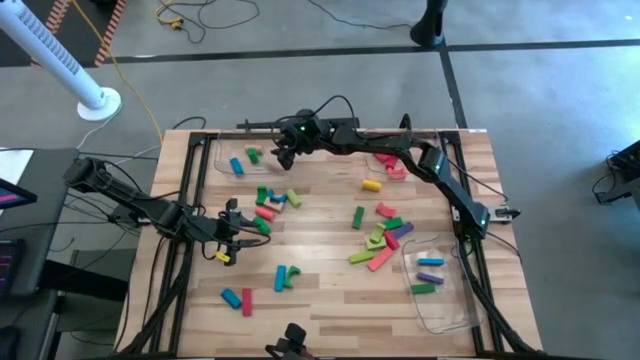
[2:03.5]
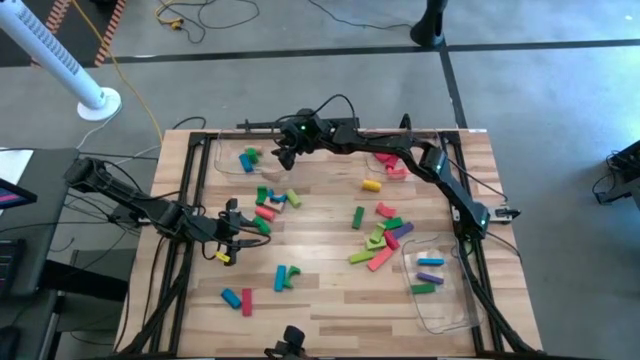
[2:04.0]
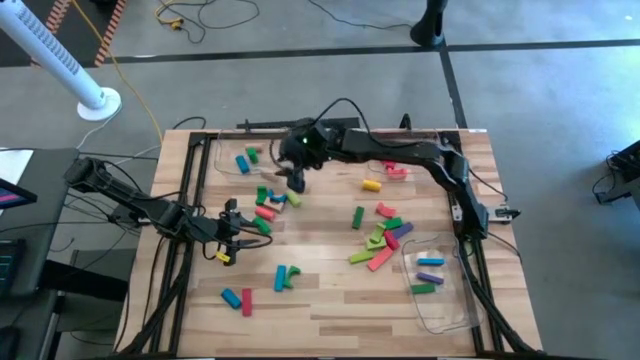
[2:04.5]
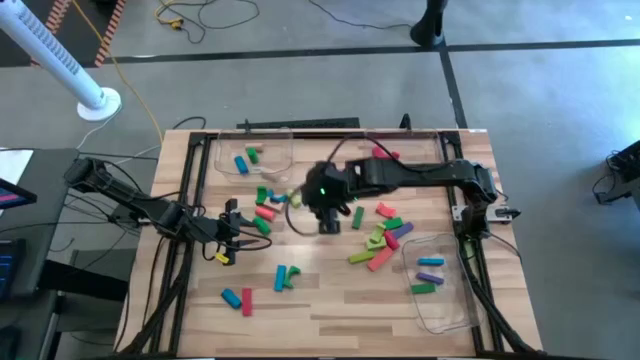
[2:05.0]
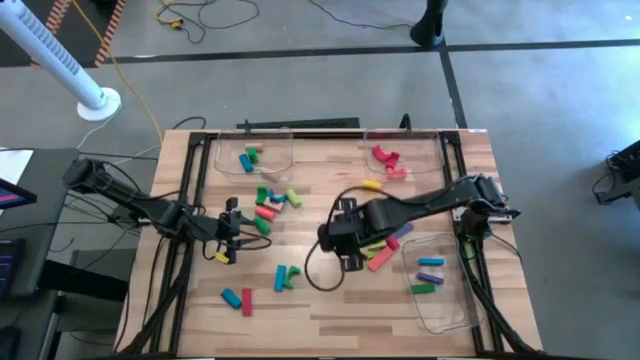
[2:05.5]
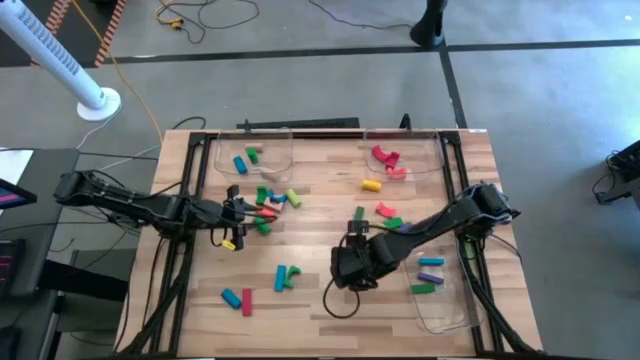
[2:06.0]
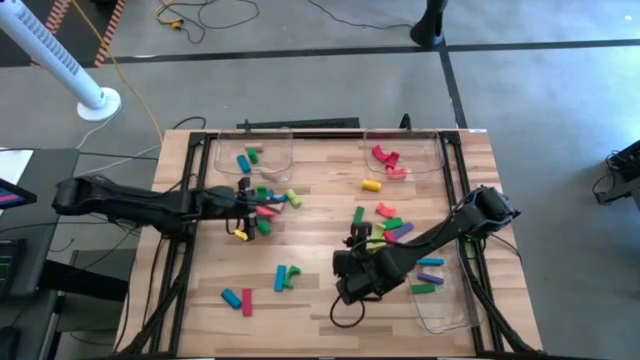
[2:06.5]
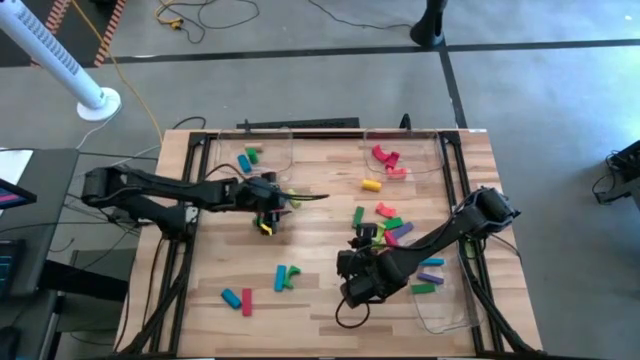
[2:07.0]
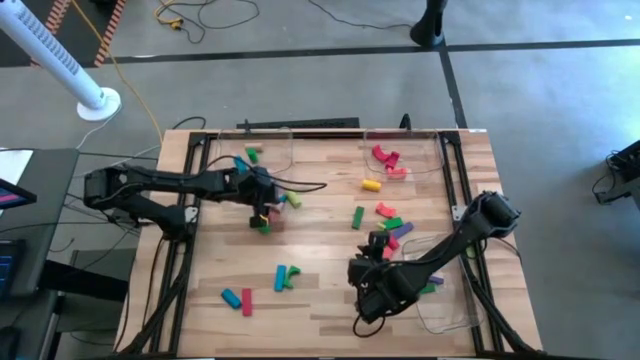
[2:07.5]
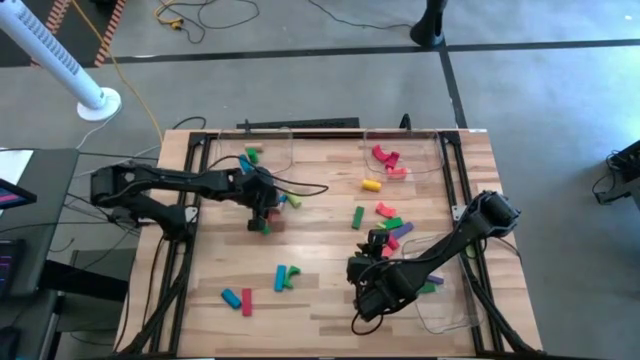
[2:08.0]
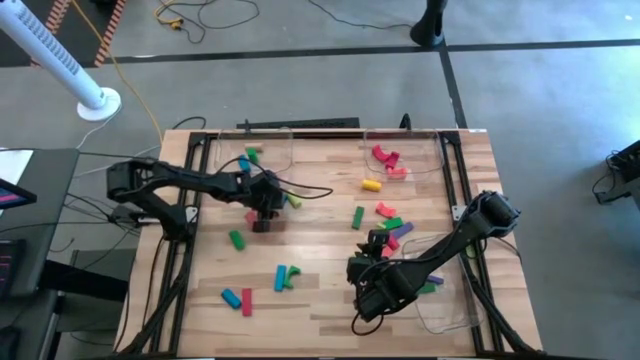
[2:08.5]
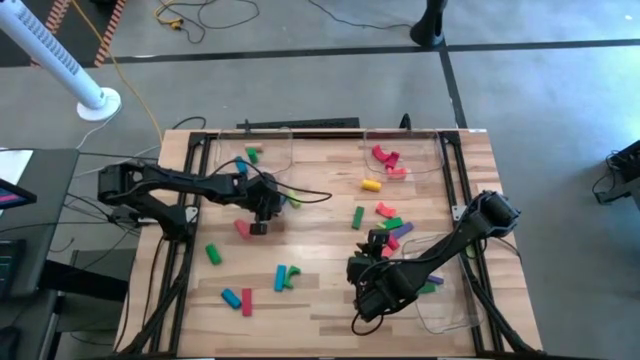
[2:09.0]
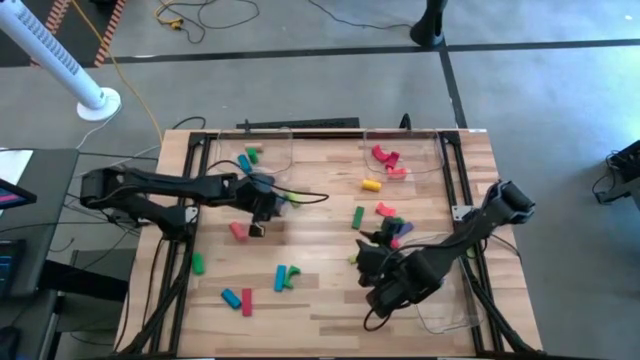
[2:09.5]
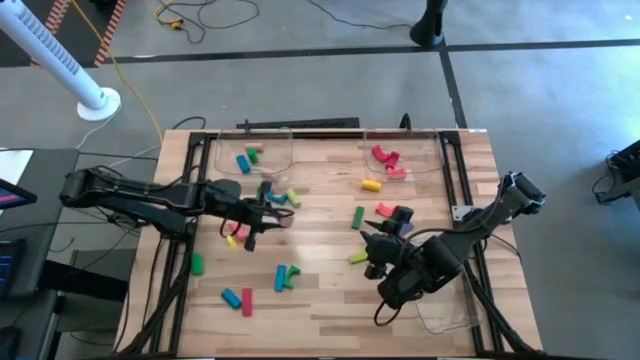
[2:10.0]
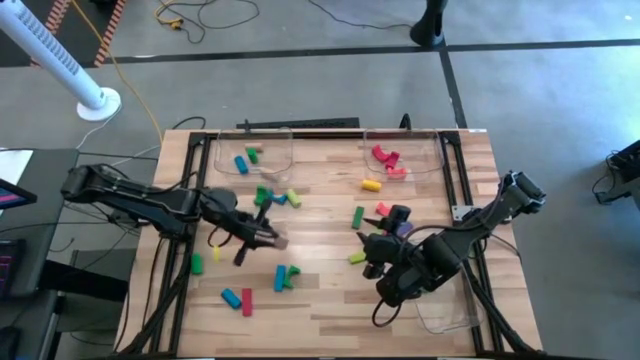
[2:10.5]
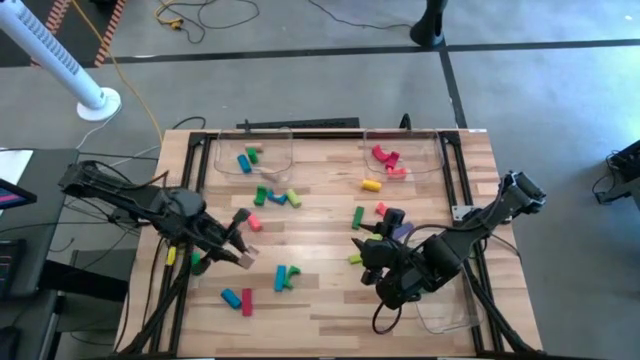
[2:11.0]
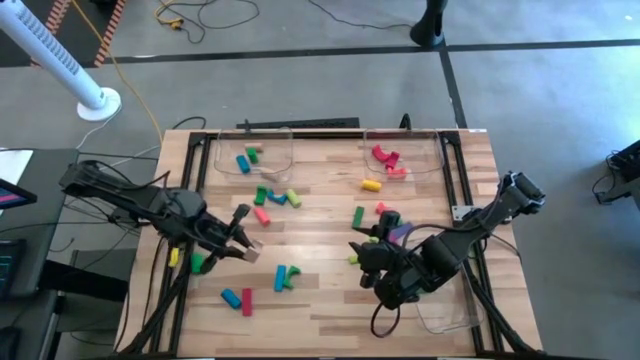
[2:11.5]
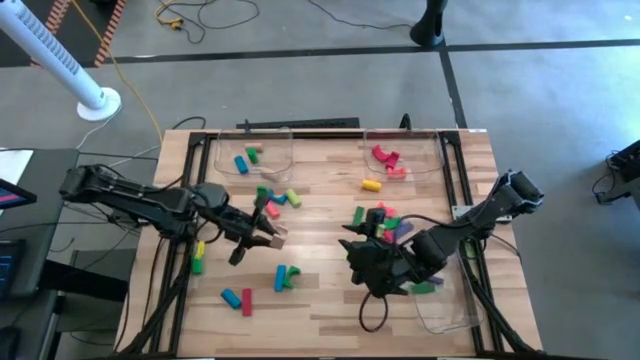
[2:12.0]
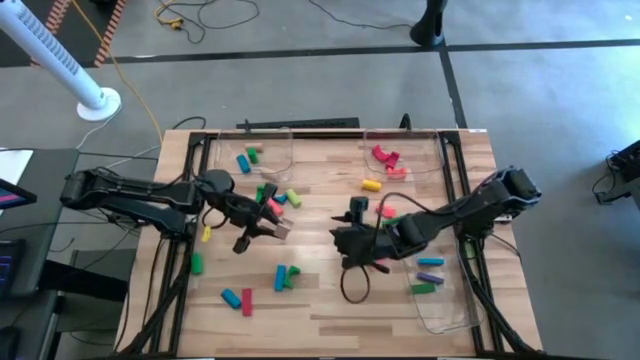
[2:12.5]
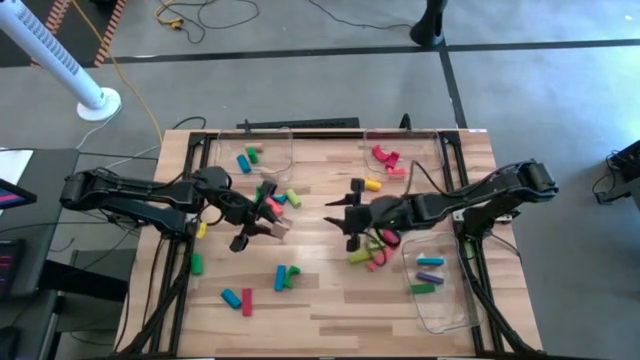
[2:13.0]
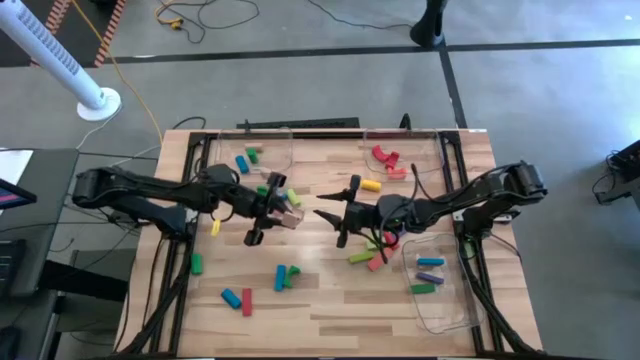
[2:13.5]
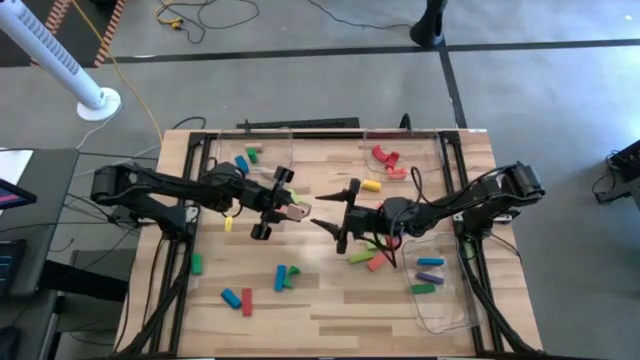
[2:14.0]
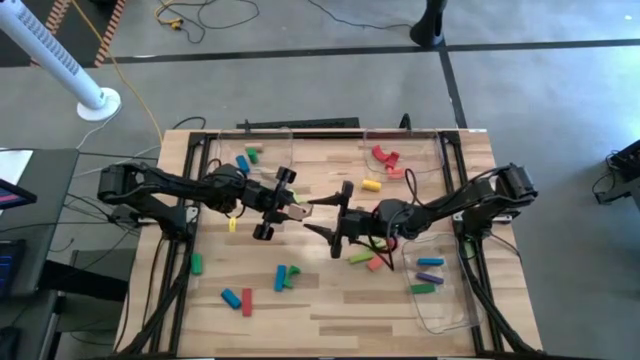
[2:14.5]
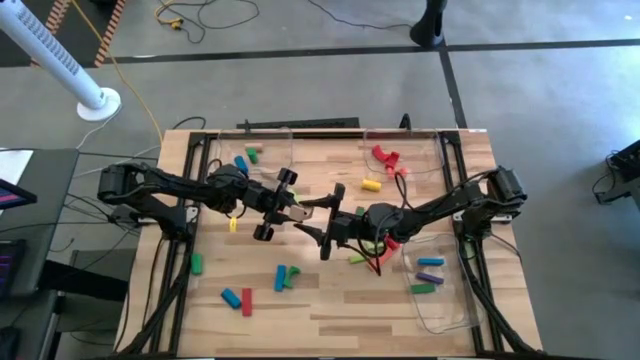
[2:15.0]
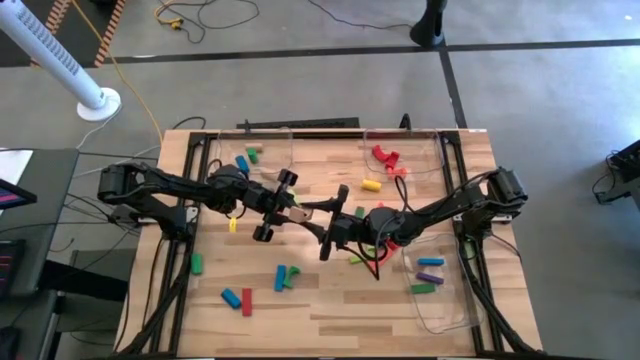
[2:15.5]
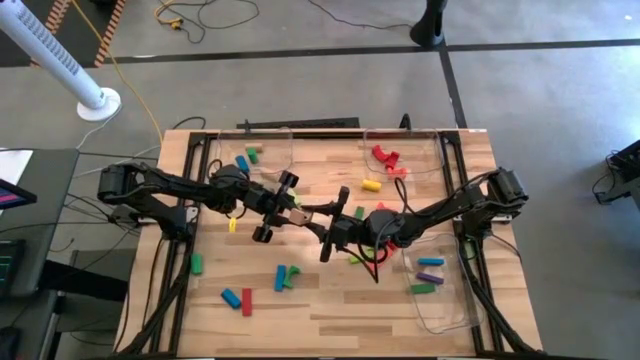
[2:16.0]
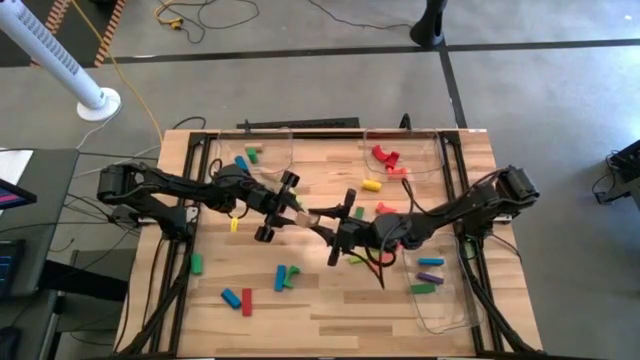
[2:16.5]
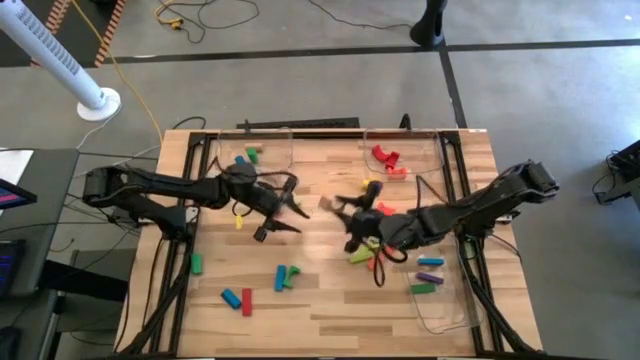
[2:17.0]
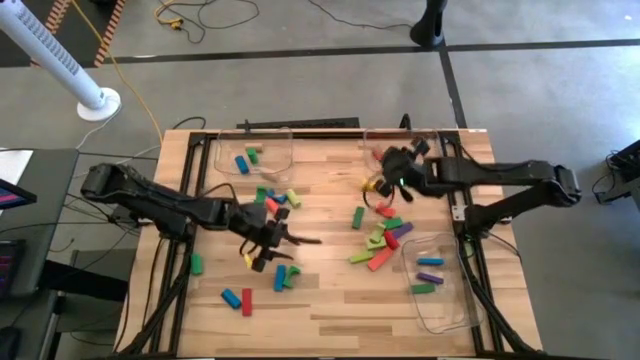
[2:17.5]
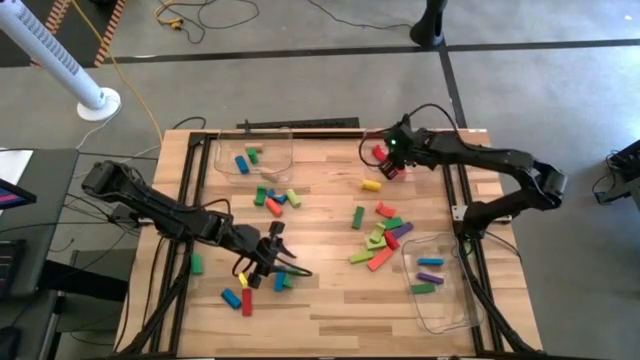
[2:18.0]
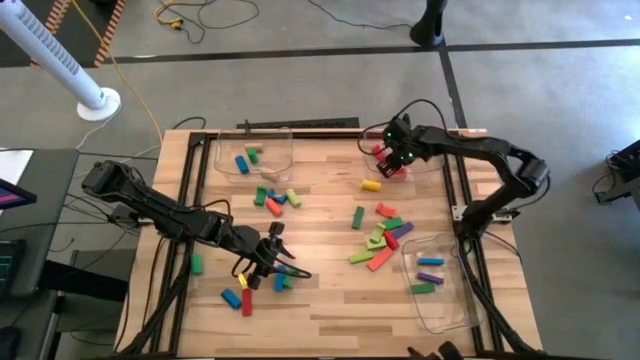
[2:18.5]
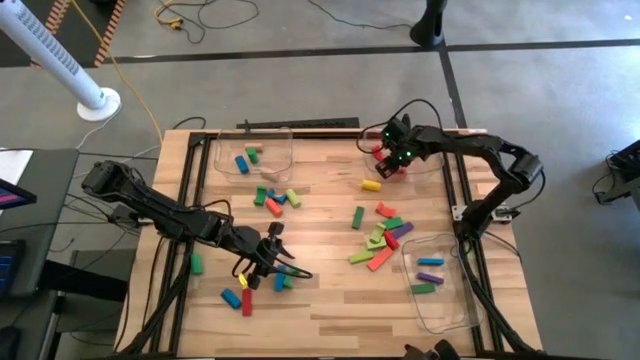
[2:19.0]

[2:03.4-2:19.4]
Task: Sort blocks by size
Put the brown arch block into the top right transparent bin

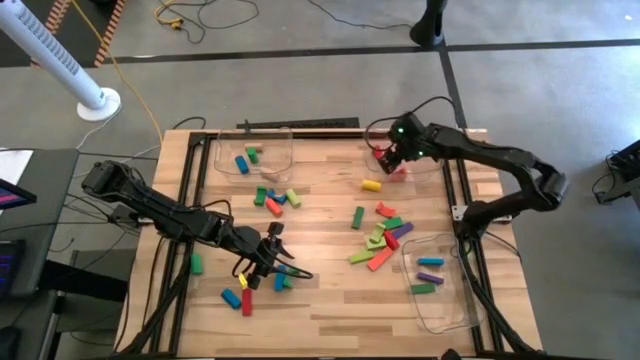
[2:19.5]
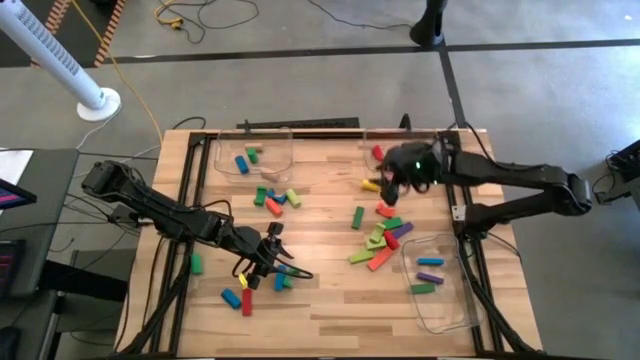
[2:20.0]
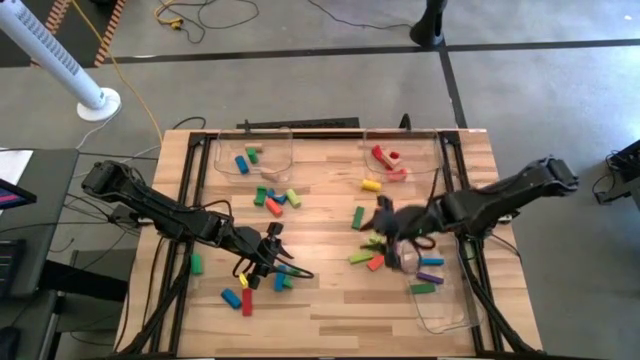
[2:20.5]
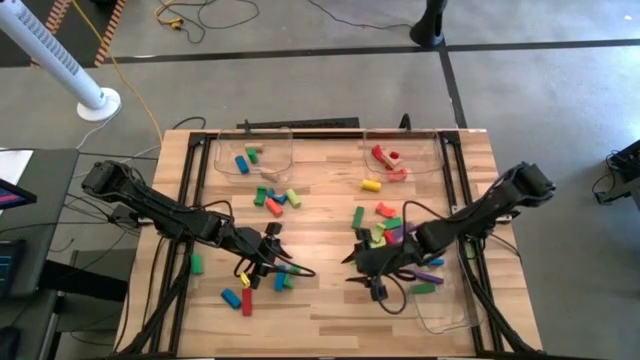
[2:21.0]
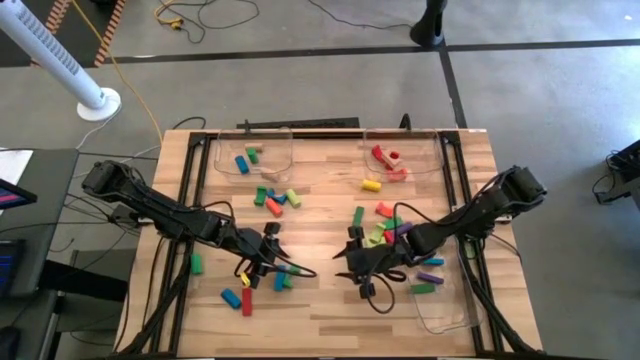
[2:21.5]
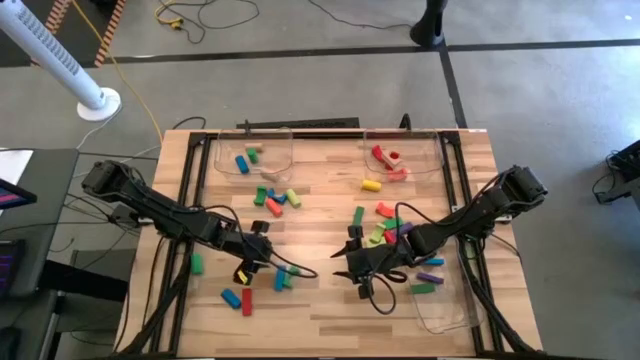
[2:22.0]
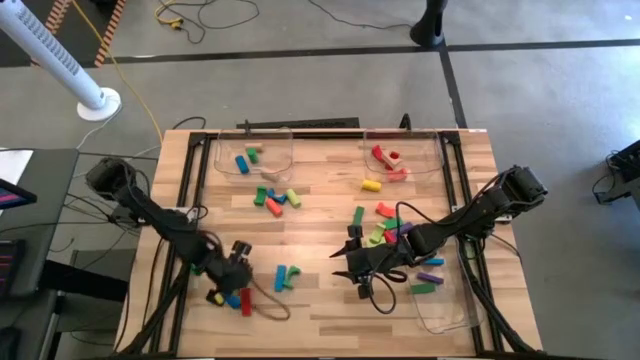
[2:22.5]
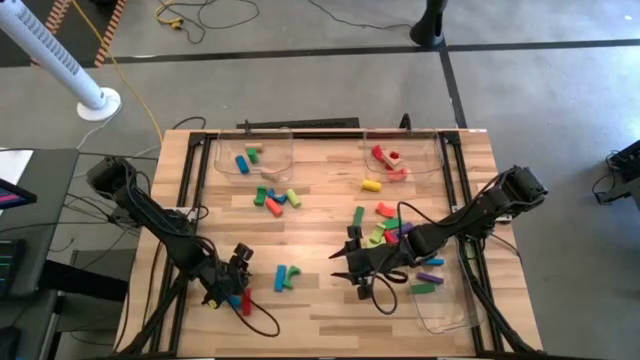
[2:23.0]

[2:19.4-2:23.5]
Put the red rectangular block into the top right transparent bin

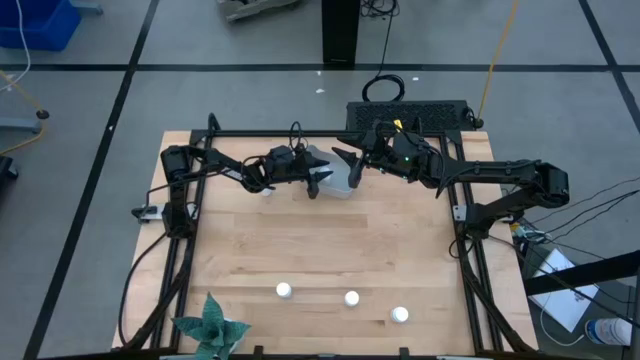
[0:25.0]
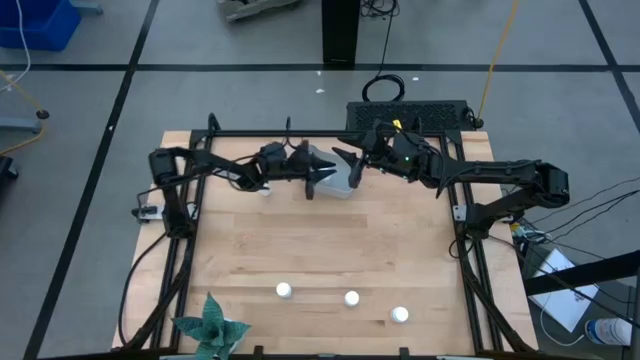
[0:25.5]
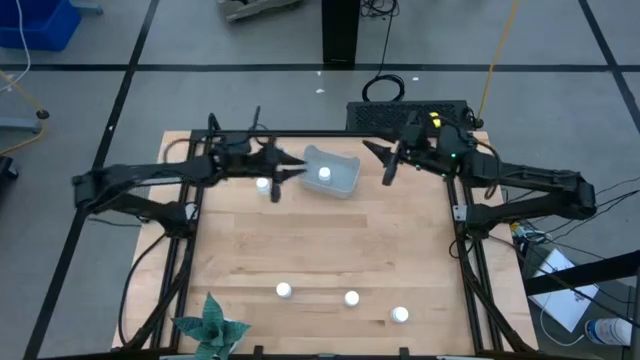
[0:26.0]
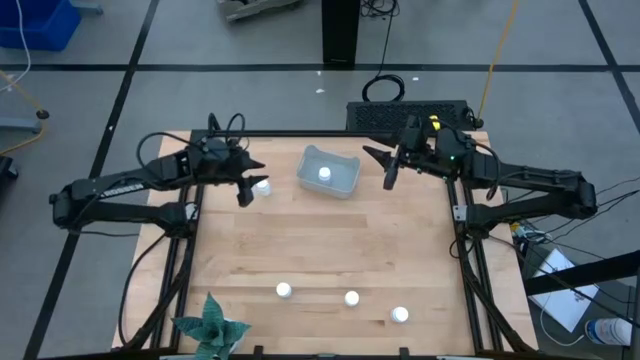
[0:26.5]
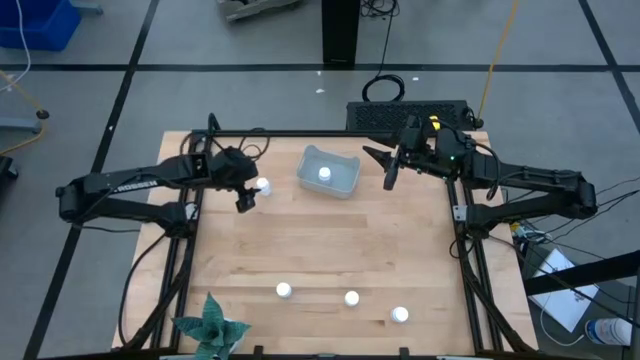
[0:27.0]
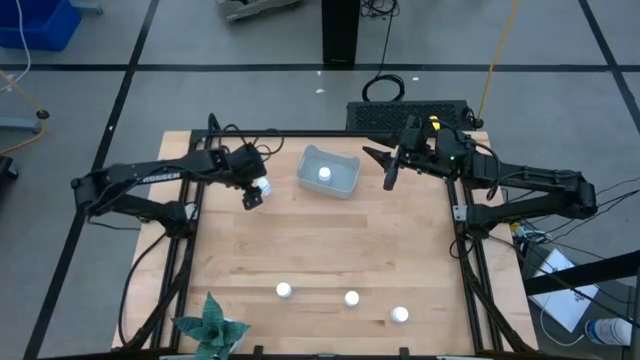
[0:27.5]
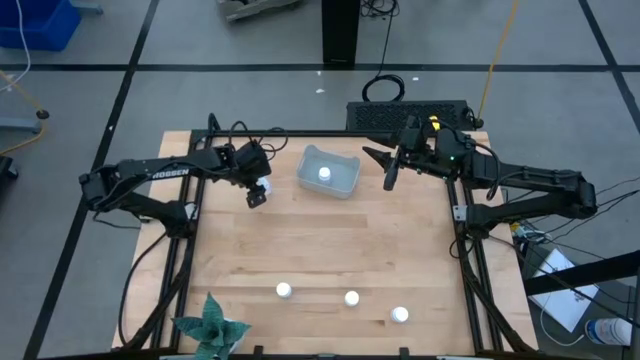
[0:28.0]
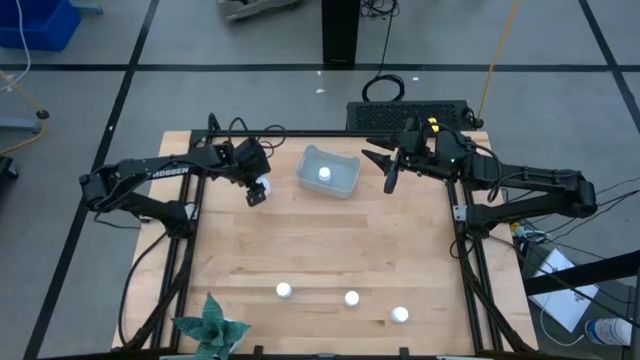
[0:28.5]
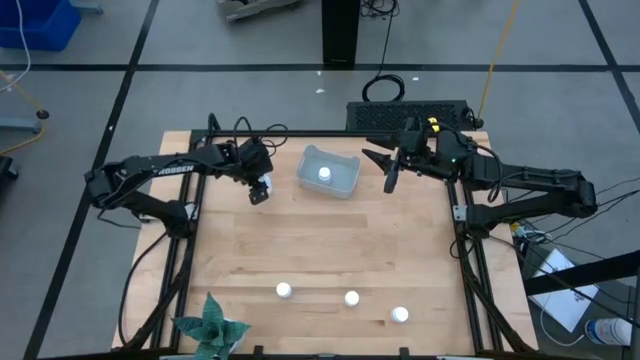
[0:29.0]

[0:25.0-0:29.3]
Task: Pick and place pill bottles into a basket
Put the white pill bottle into the gray bin
